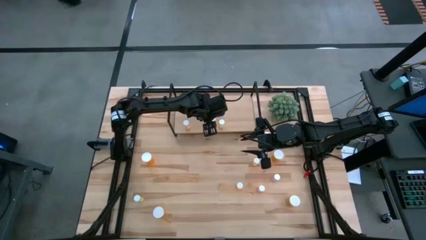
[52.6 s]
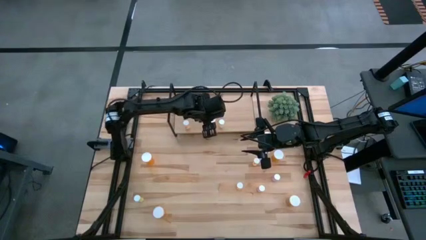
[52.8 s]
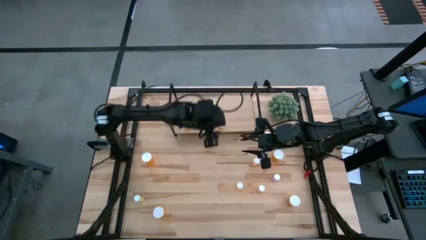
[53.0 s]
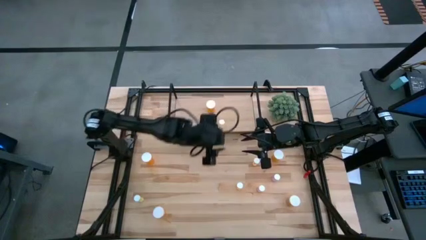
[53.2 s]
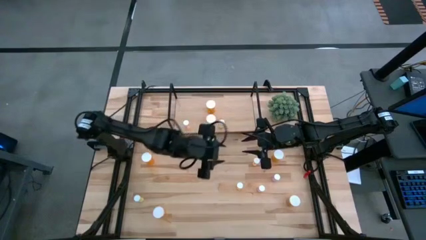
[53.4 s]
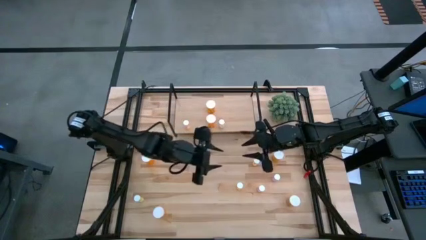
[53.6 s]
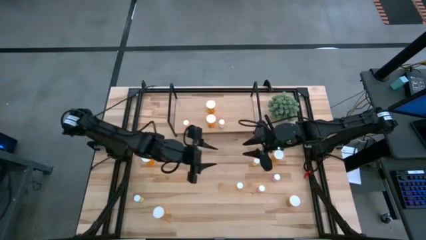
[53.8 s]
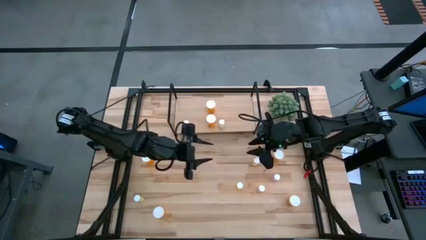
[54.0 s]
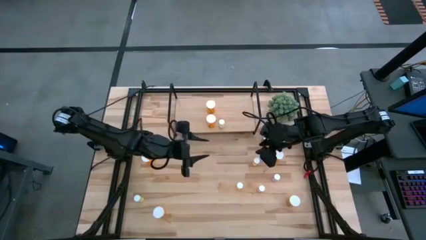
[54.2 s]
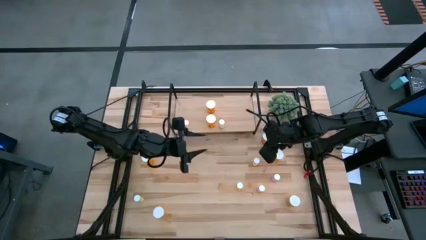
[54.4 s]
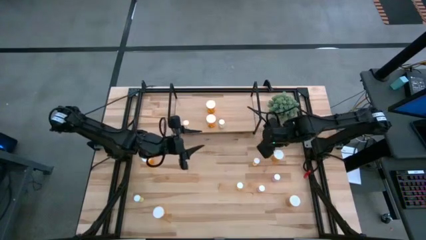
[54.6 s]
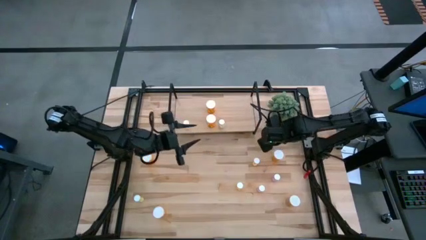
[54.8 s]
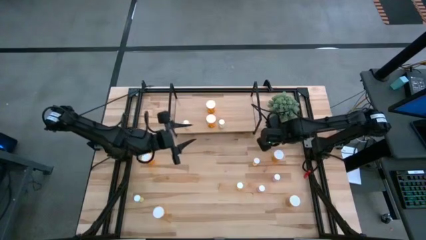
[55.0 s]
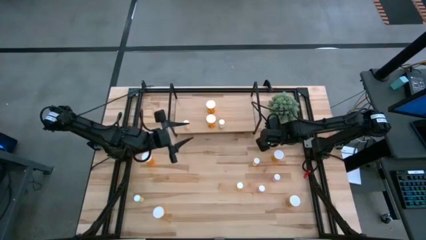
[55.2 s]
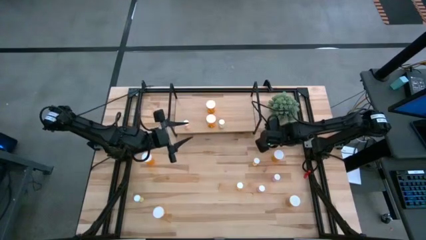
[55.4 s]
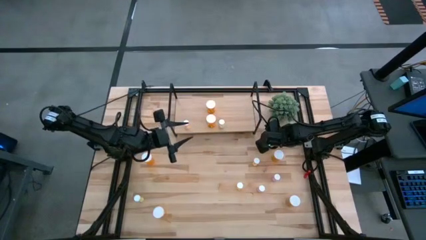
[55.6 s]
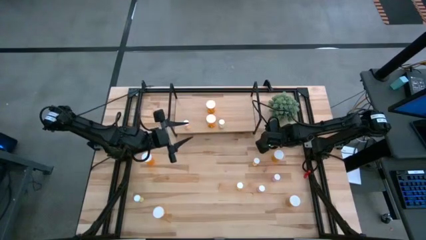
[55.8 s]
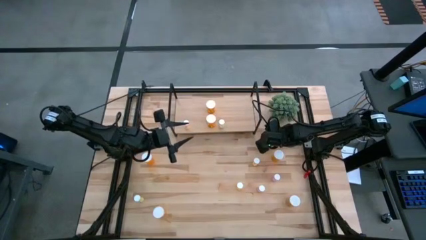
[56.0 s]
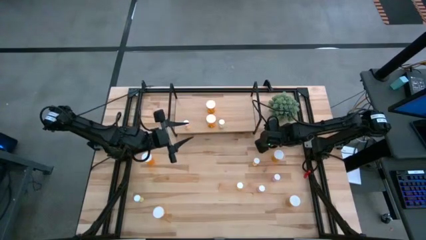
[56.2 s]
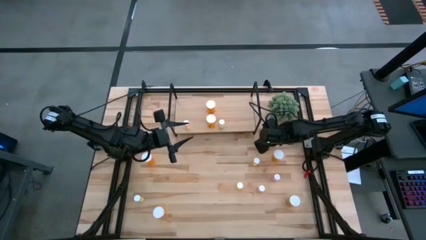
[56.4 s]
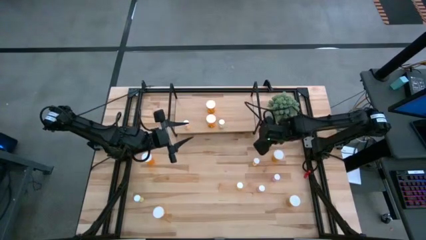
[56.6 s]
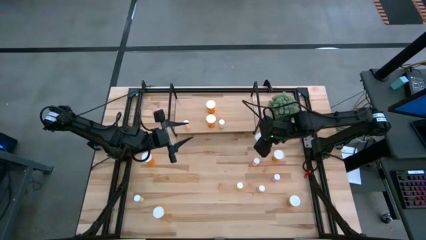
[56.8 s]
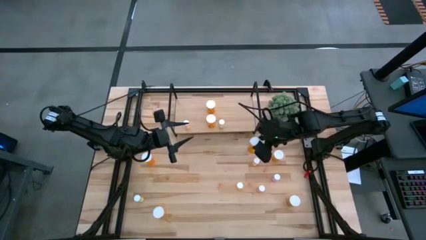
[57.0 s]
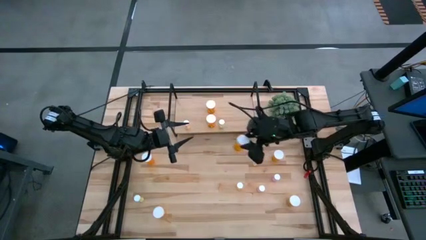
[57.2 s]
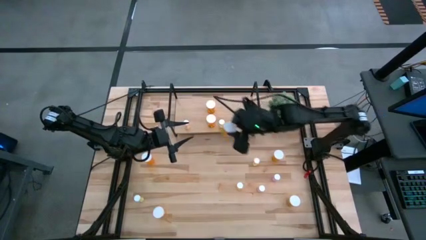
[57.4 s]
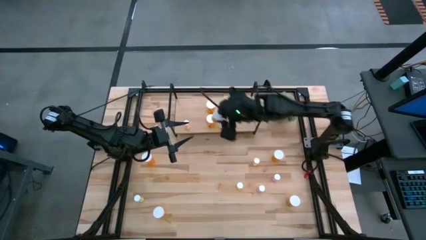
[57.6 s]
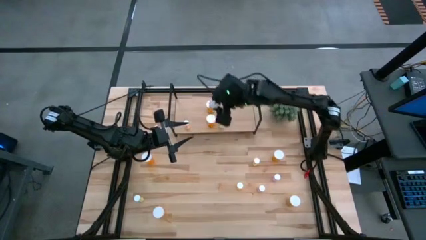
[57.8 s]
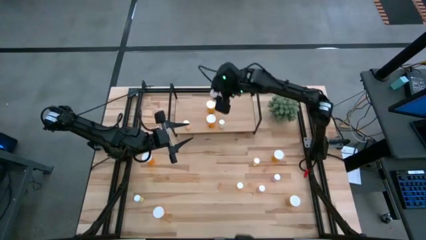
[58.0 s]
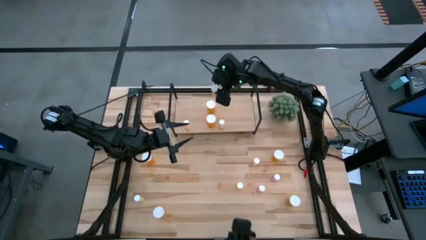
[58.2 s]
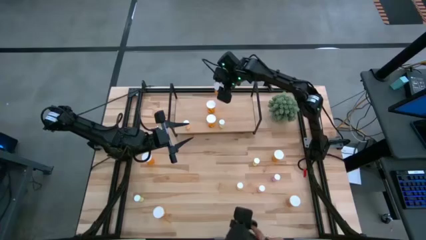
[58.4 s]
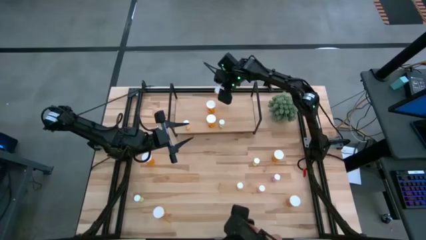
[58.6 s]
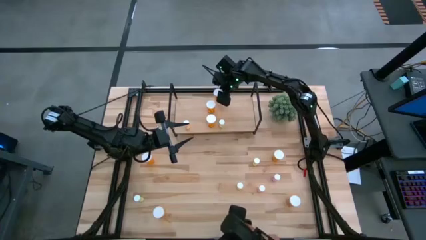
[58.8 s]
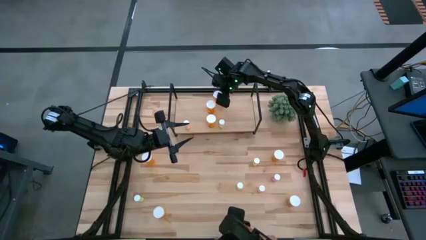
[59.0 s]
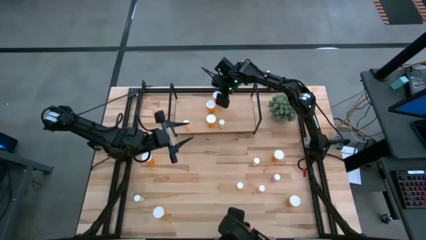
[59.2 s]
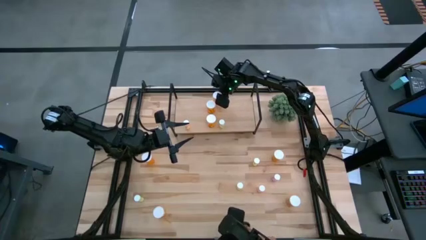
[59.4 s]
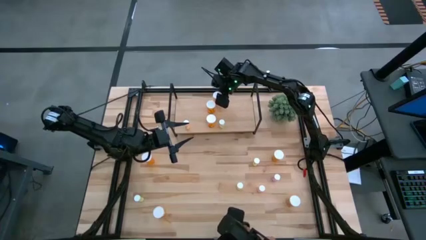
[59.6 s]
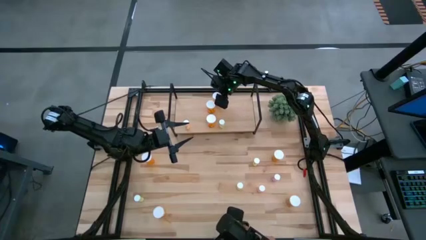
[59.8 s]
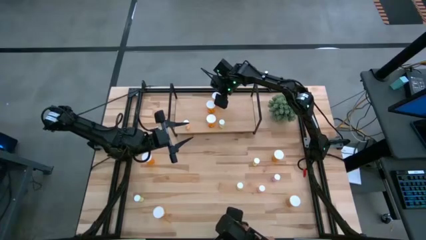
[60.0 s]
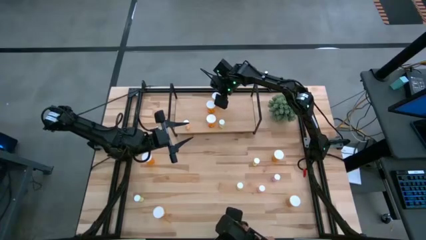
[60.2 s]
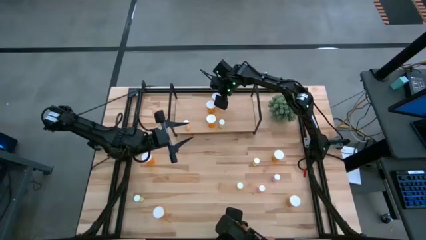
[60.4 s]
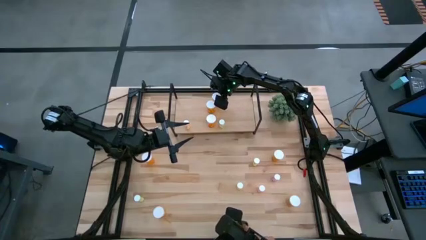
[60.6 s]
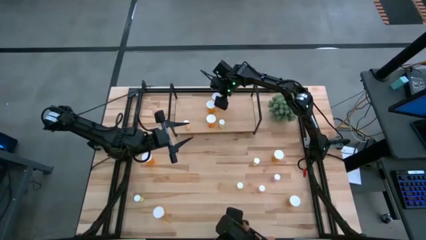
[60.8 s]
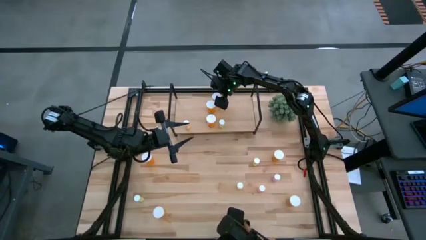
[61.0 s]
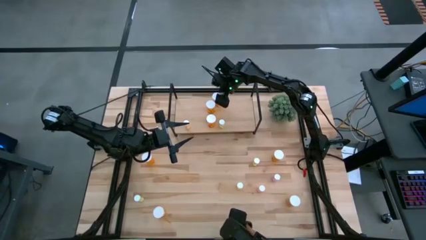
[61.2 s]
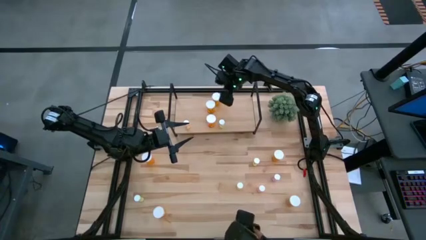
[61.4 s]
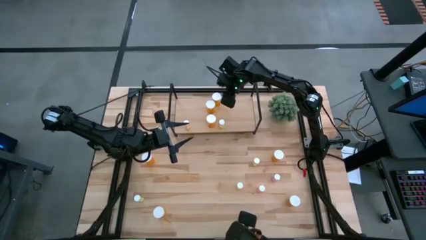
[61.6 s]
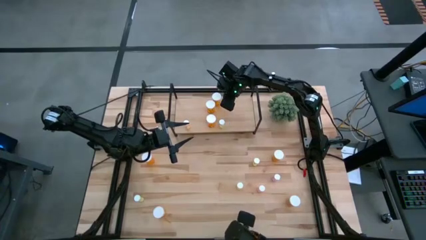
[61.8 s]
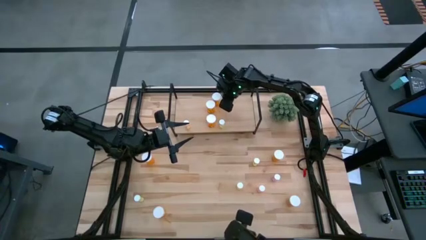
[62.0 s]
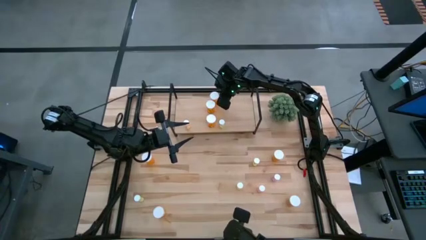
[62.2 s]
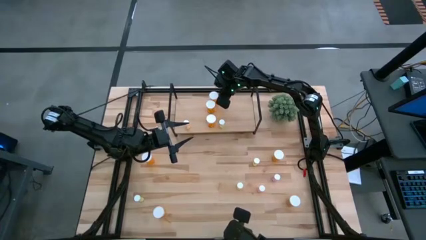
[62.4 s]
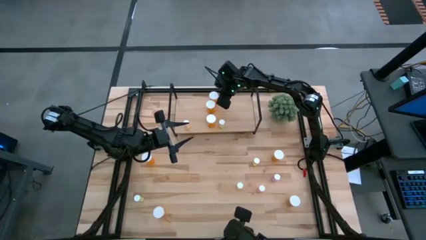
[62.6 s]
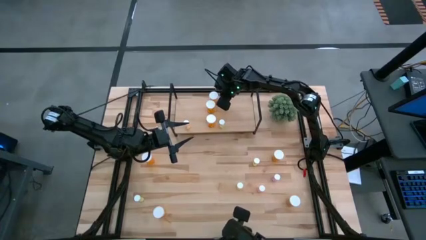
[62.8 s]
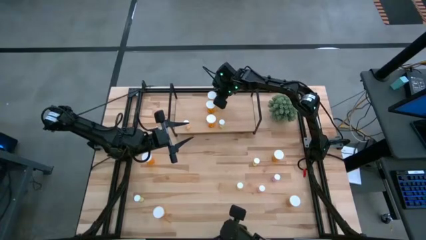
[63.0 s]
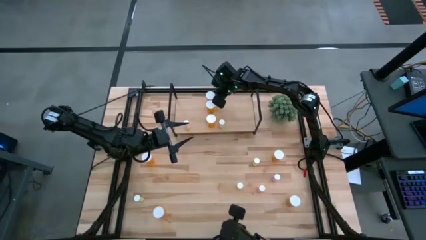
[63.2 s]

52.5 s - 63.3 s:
Task: Pick and place medicine bottles onto shelf by color
Put the large orange pill bottle on the shelf aligned with the other large orange pill bottle

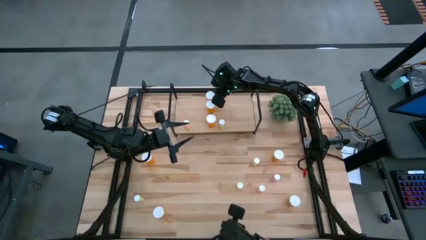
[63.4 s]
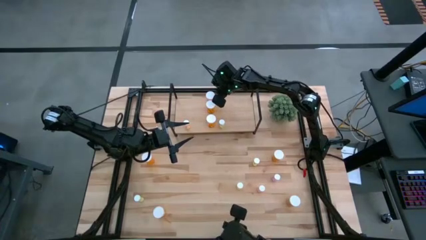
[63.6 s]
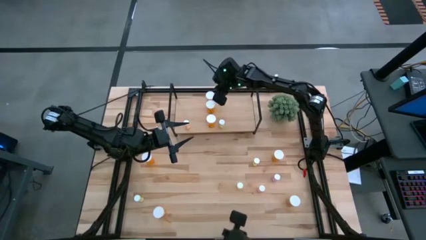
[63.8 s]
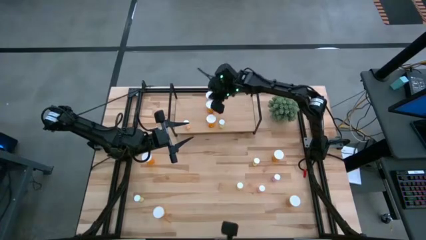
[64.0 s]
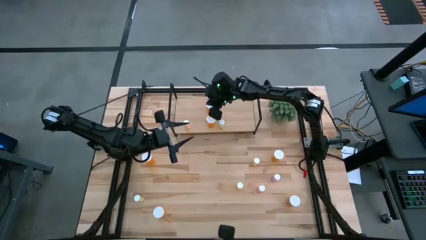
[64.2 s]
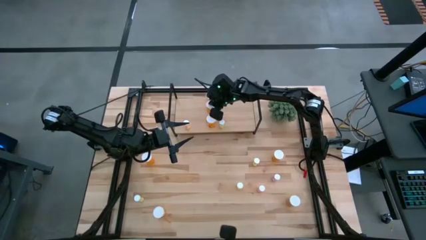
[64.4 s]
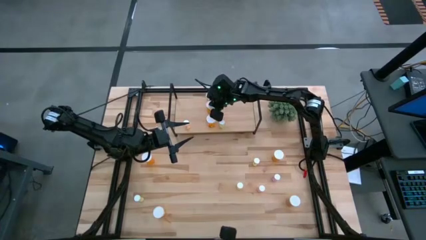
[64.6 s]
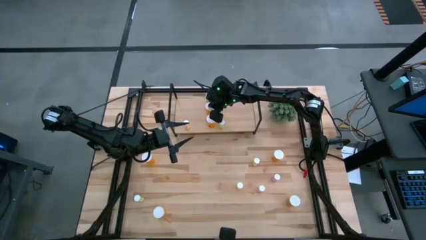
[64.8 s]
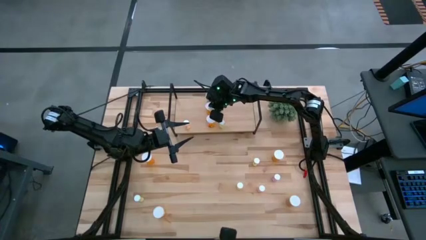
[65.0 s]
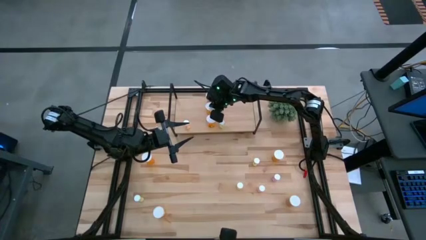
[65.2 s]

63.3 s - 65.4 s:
Adjust the large orange pill bottle on the shelf

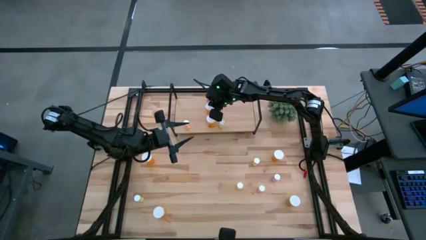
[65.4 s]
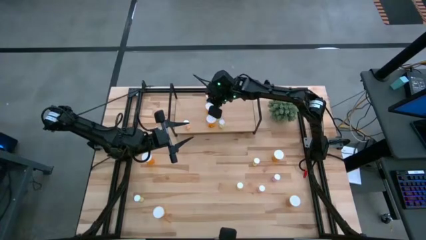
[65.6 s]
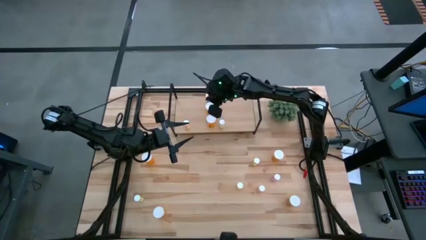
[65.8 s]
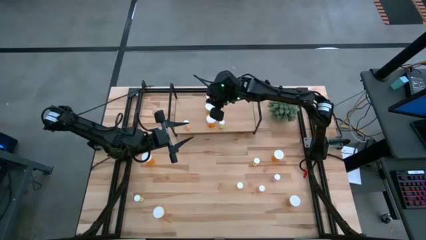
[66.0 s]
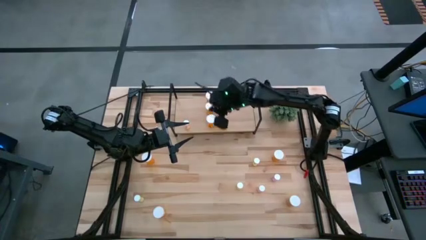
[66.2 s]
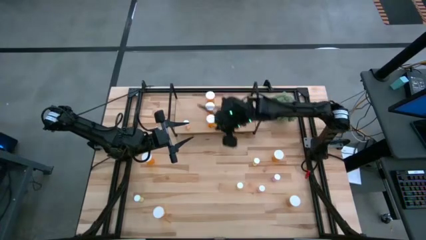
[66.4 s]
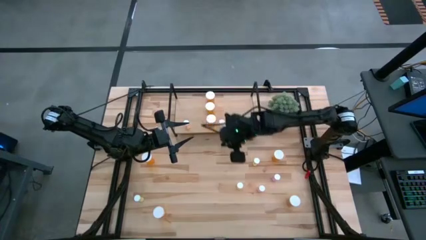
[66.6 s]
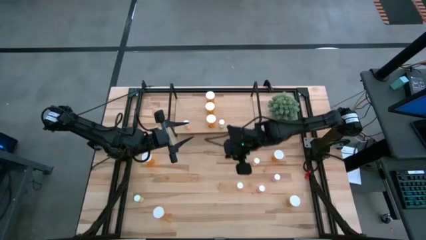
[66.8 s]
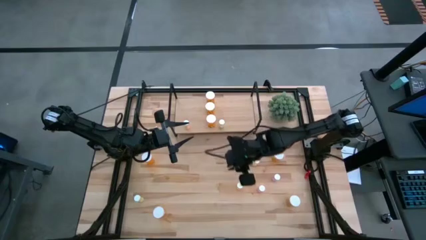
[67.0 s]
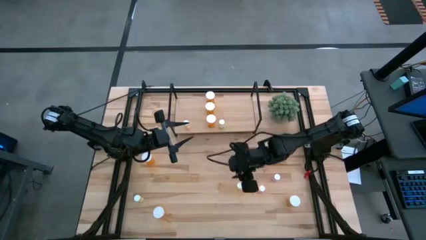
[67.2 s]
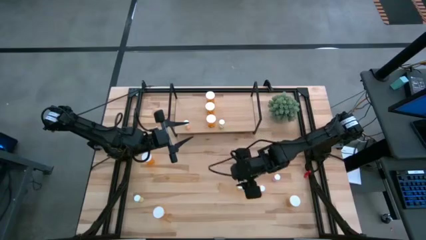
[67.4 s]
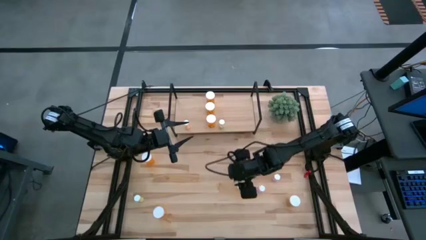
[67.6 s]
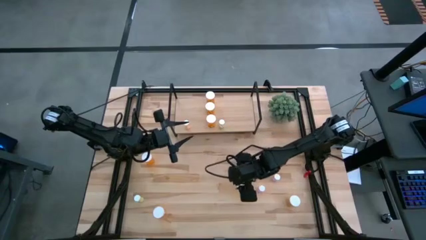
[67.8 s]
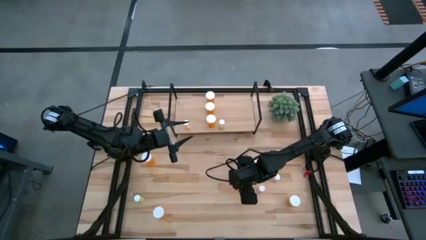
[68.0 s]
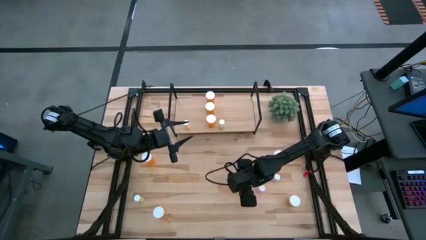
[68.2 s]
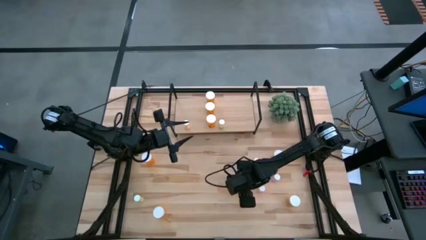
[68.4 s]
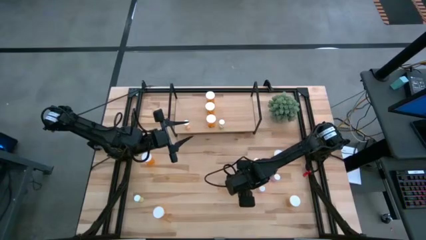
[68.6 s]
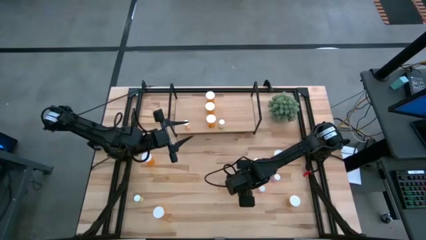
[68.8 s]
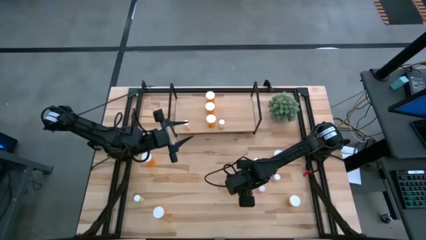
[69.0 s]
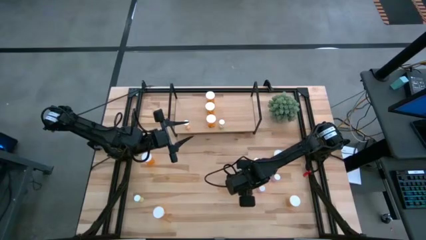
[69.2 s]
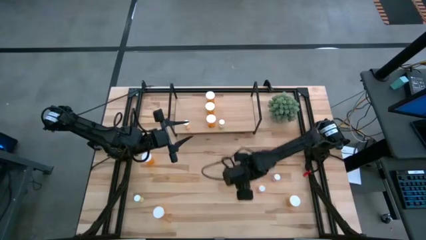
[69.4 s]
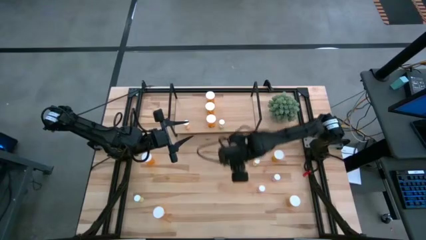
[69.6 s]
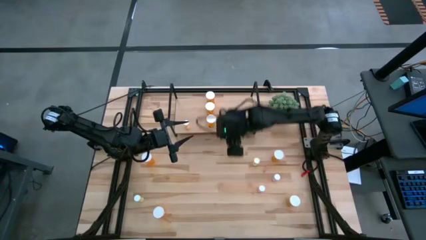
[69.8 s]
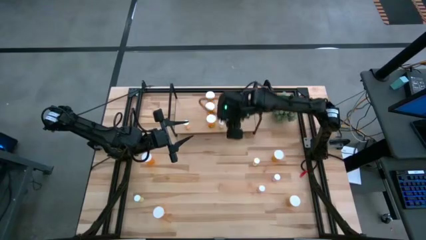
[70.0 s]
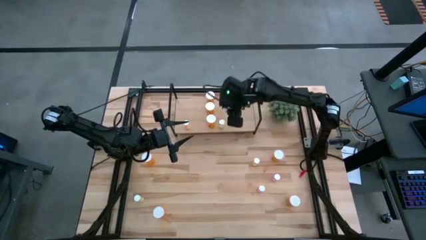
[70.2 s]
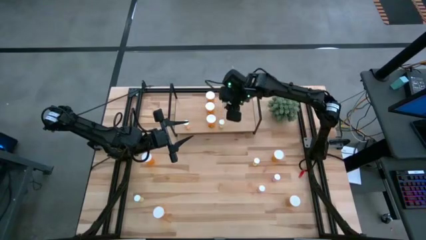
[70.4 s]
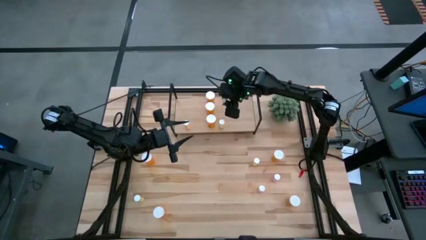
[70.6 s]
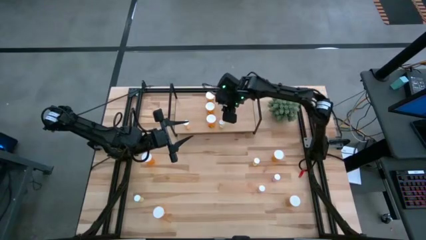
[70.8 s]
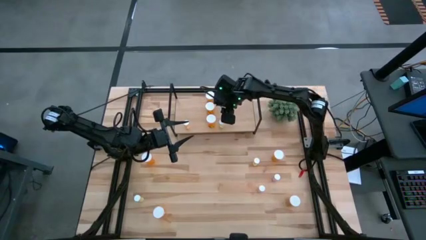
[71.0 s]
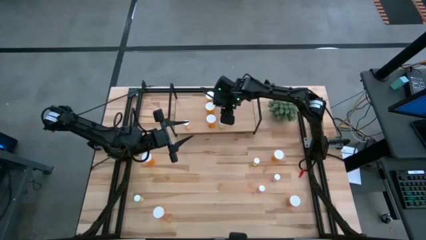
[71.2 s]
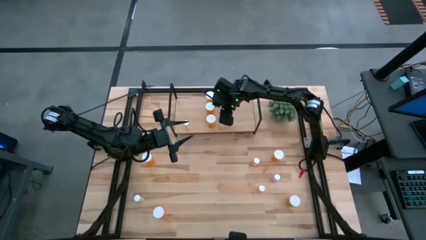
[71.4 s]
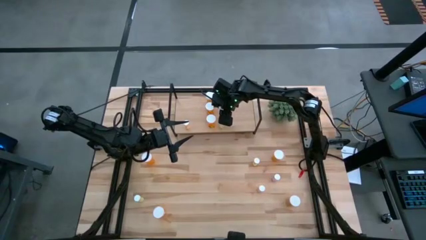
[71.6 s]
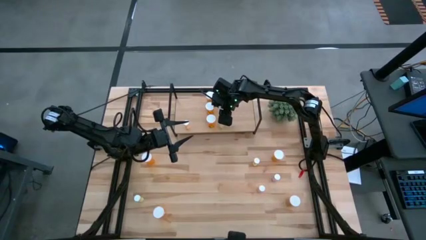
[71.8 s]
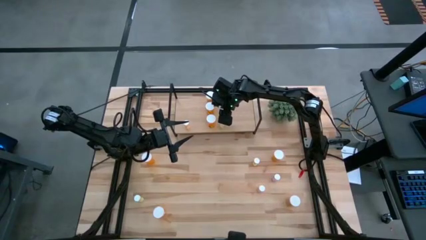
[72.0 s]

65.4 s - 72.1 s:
Put the small yellow pill bottle on the shelf aligned with the other small yellow pill bottle
